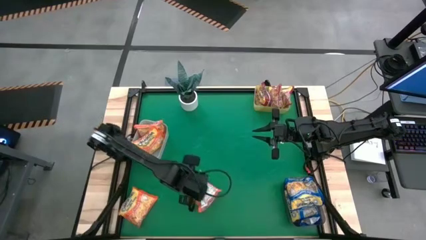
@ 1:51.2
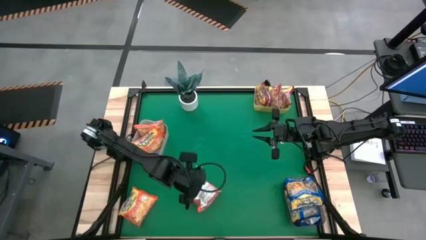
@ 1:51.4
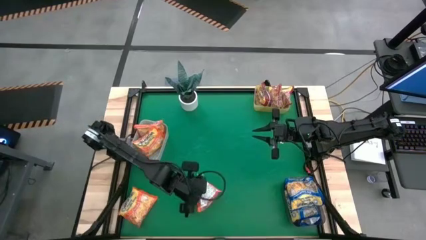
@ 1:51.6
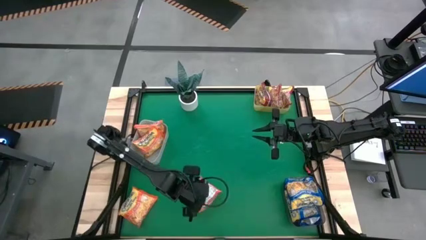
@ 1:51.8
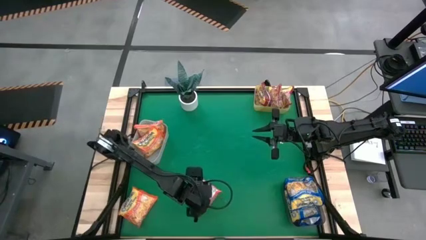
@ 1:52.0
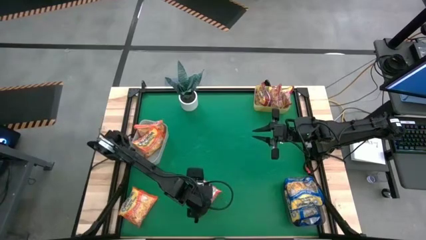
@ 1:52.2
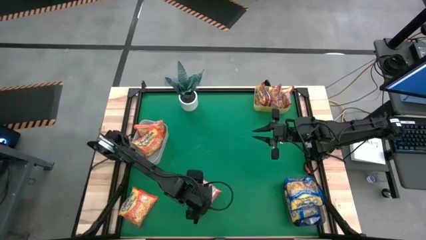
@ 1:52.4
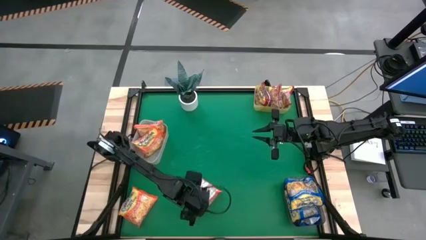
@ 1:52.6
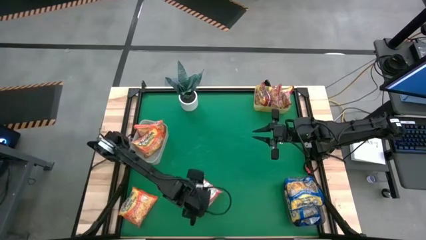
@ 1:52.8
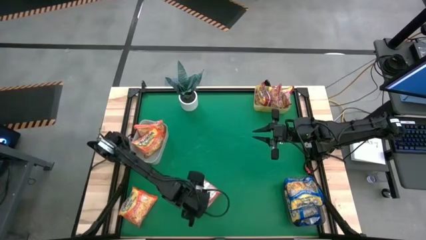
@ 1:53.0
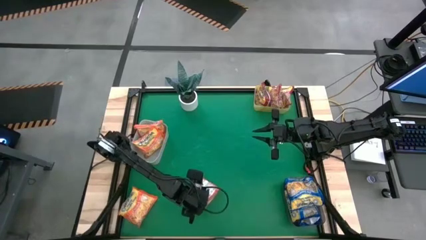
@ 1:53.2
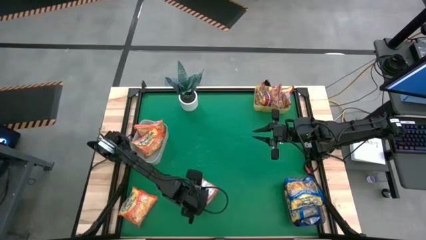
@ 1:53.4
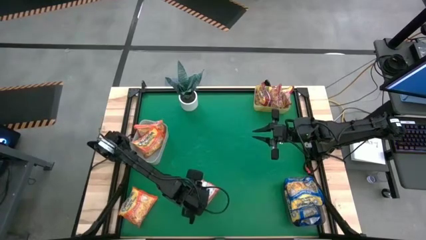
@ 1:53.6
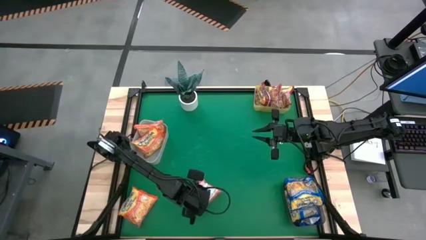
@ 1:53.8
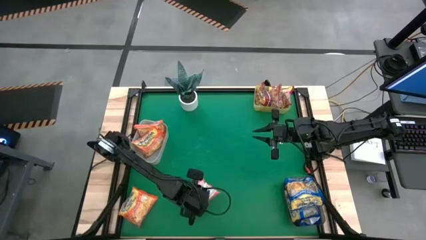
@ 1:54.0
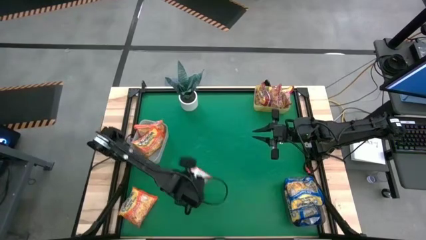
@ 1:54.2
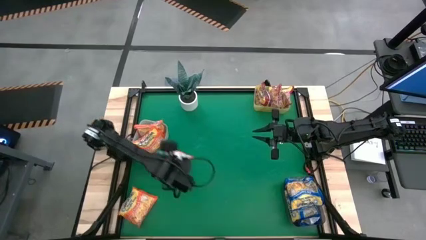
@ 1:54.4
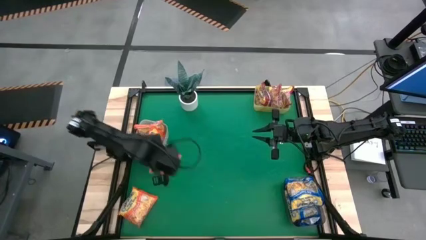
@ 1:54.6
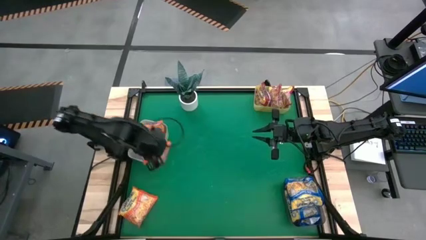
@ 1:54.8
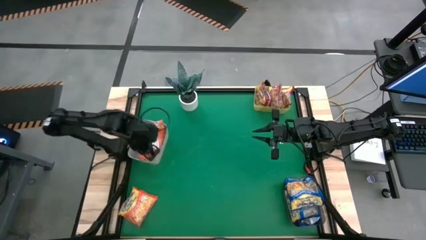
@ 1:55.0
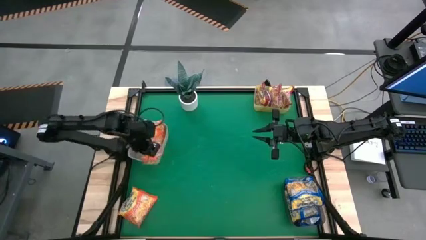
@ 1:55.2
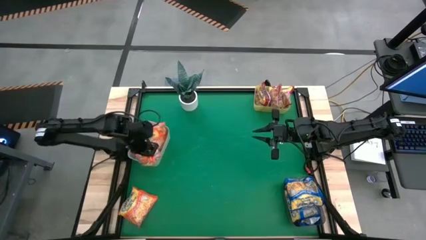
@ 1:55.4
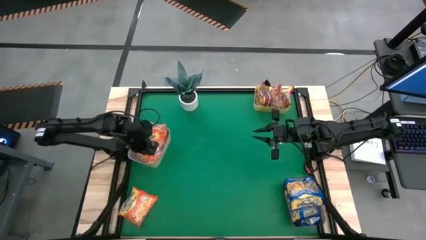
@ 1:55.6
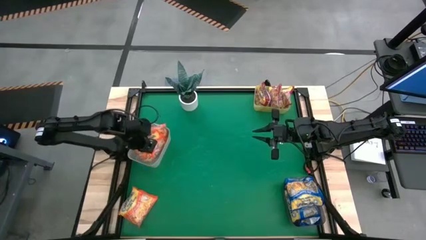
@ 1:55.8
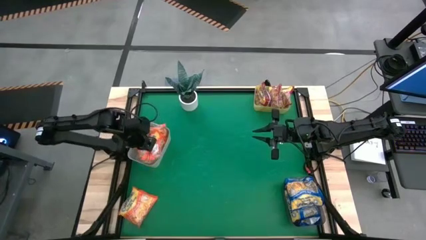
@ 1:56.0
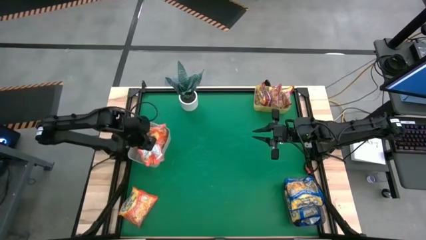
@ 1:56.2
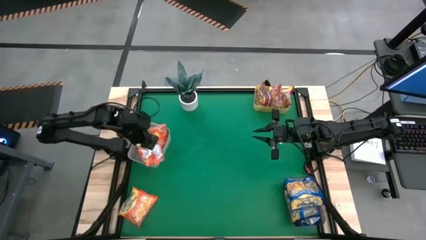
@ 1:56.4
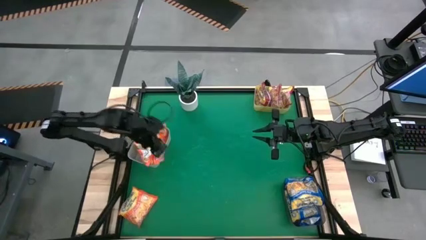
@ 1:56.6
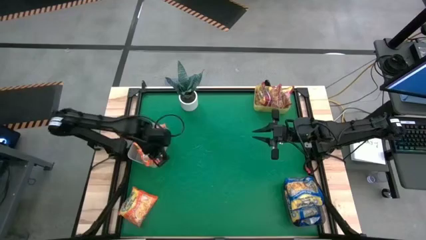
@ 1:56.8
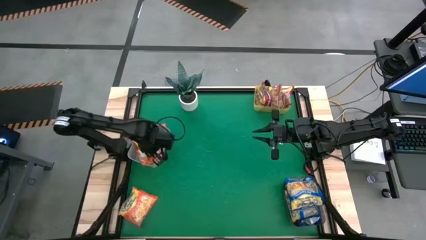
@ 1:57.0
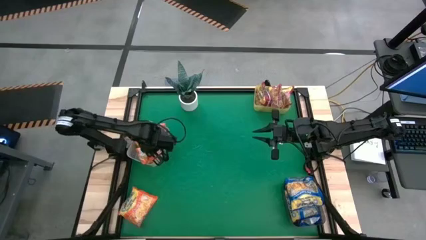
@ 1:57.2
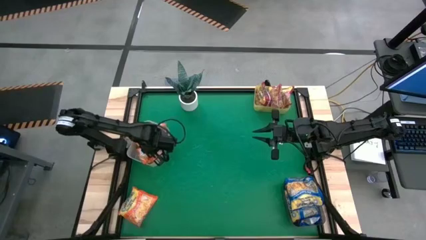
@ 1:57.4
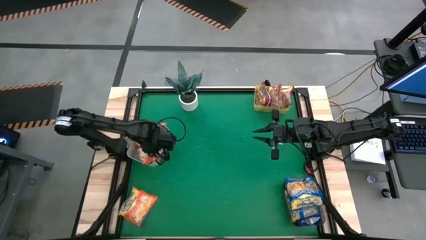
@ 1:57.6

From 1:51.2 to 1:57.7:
Task: Sort Maruchan noodles
Put the orange noodle pack into the white bin

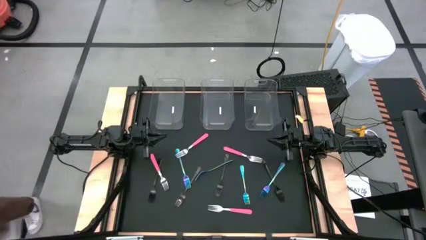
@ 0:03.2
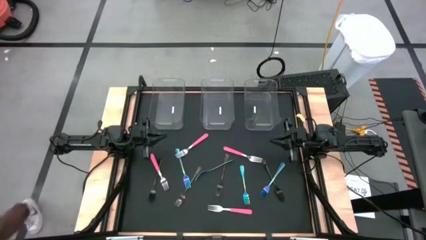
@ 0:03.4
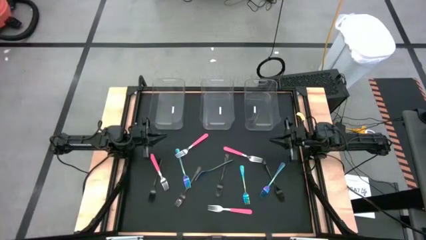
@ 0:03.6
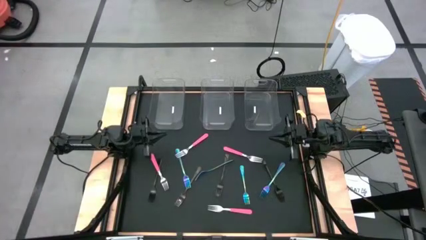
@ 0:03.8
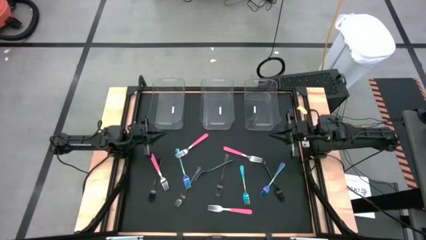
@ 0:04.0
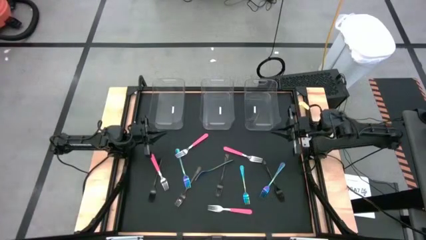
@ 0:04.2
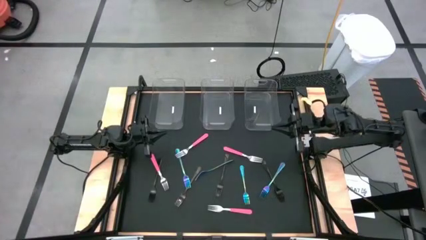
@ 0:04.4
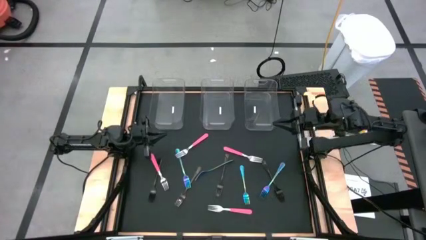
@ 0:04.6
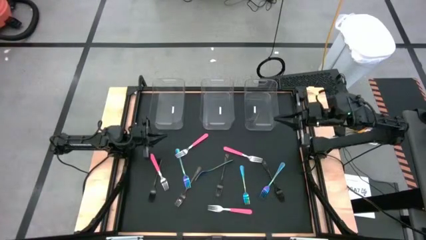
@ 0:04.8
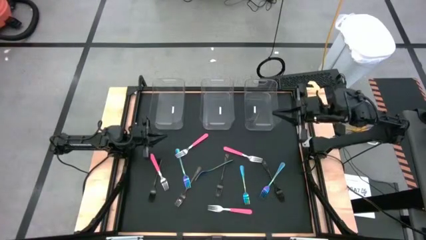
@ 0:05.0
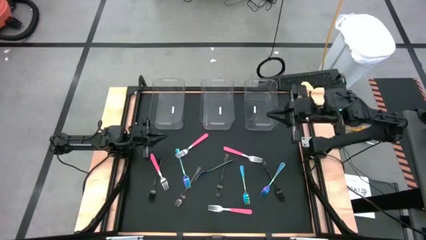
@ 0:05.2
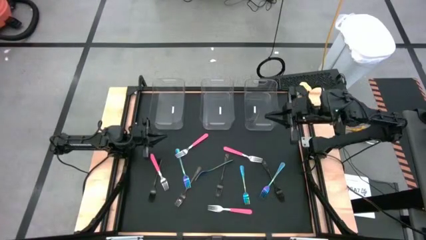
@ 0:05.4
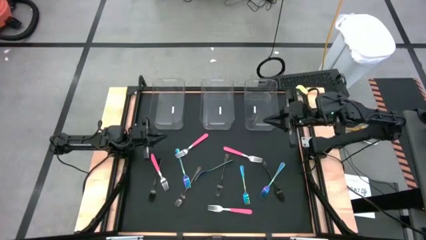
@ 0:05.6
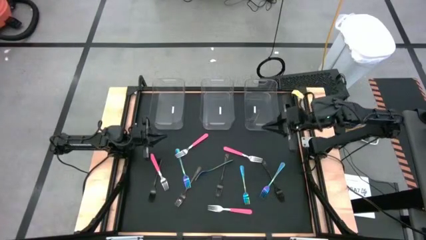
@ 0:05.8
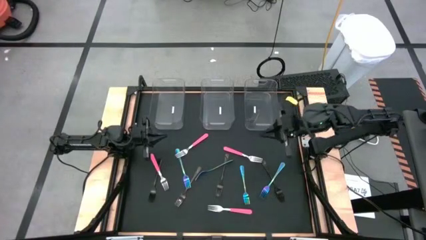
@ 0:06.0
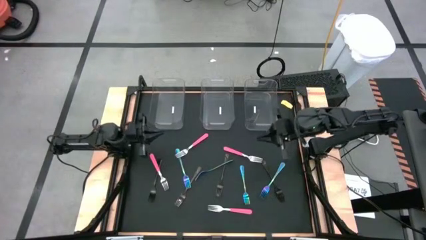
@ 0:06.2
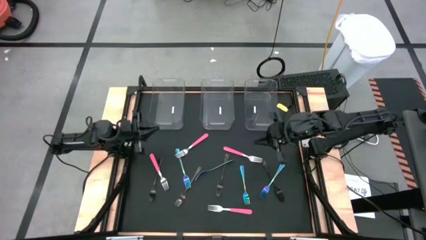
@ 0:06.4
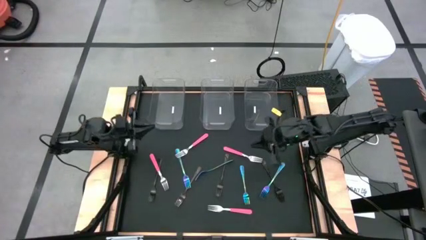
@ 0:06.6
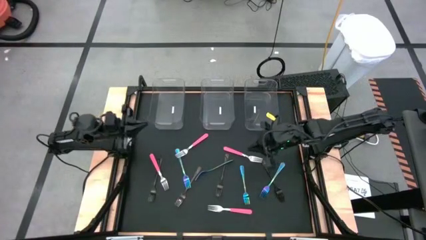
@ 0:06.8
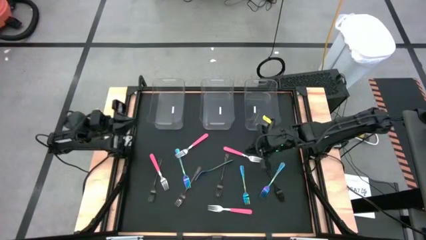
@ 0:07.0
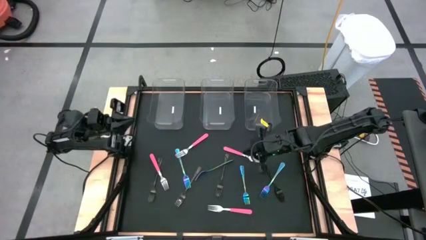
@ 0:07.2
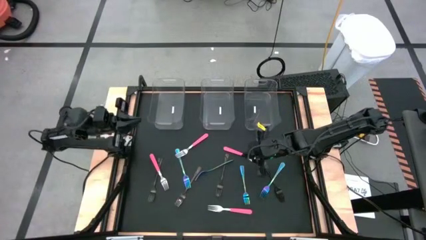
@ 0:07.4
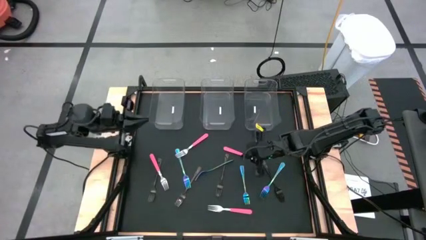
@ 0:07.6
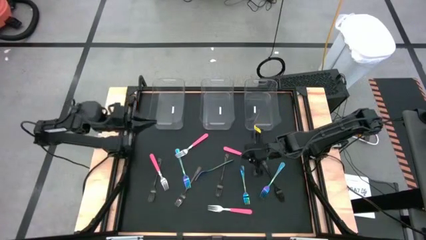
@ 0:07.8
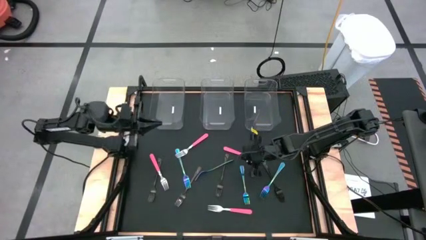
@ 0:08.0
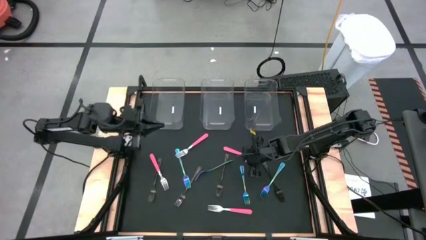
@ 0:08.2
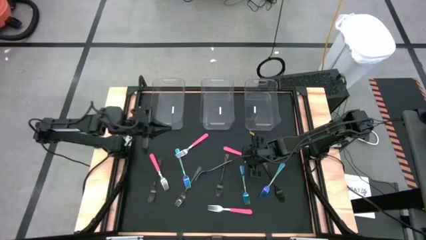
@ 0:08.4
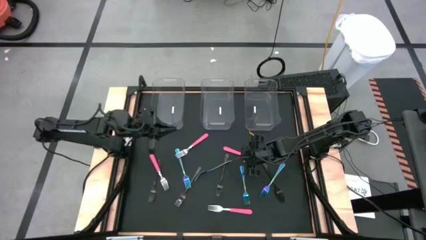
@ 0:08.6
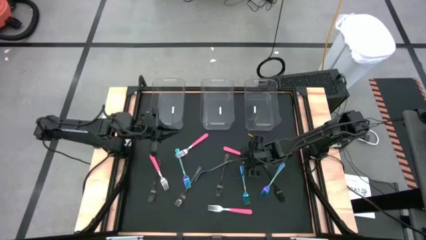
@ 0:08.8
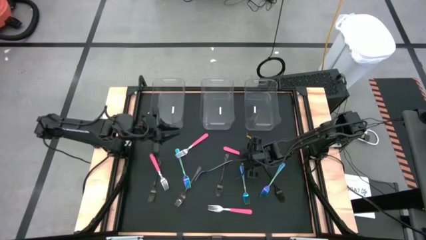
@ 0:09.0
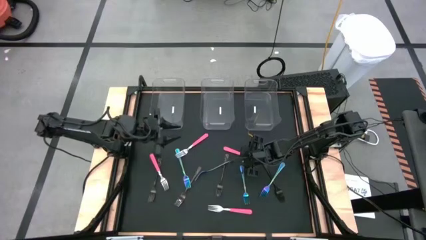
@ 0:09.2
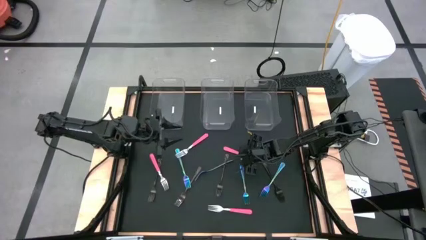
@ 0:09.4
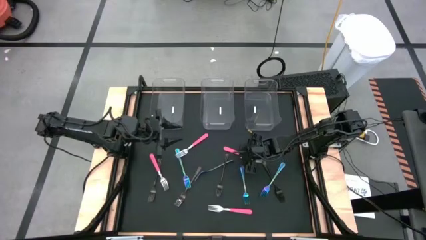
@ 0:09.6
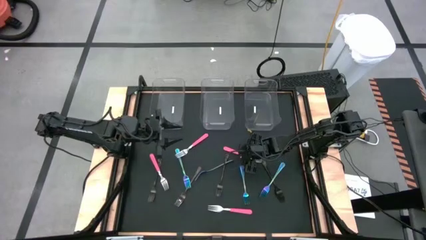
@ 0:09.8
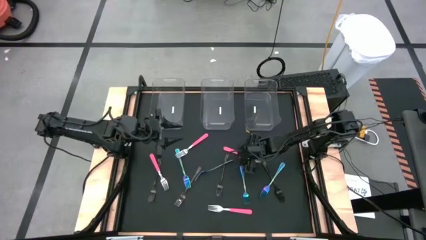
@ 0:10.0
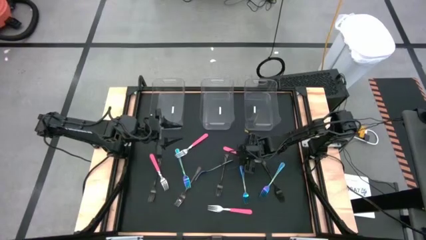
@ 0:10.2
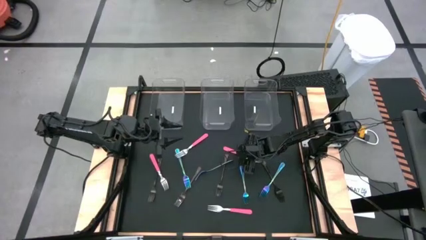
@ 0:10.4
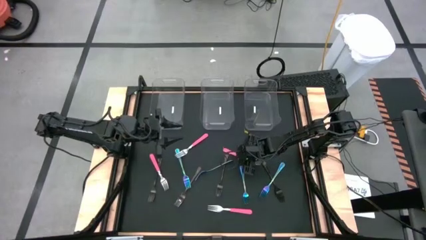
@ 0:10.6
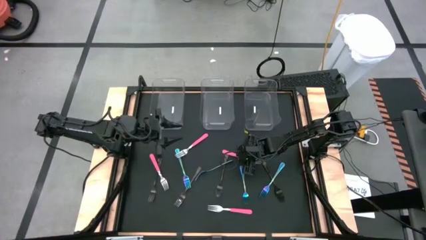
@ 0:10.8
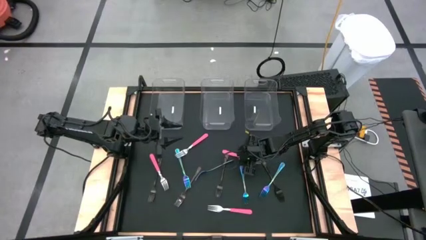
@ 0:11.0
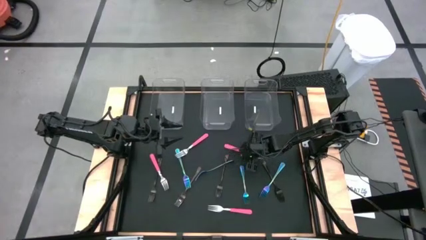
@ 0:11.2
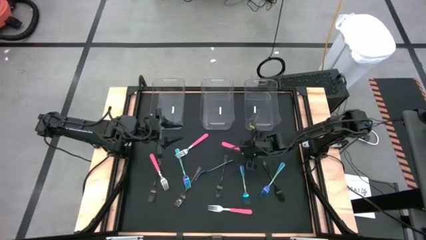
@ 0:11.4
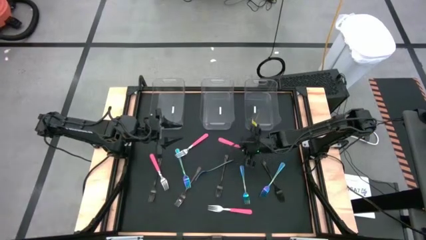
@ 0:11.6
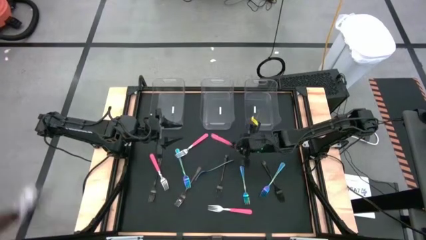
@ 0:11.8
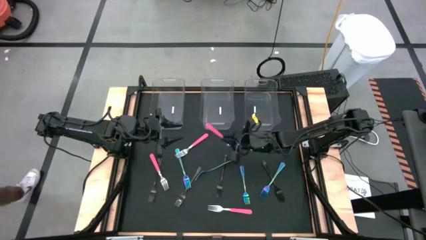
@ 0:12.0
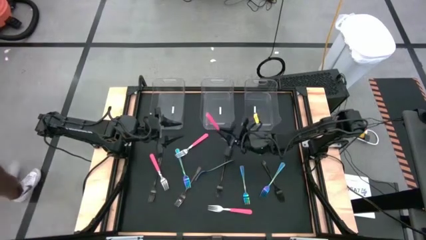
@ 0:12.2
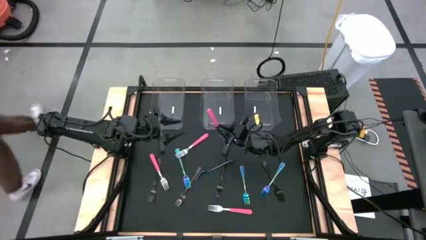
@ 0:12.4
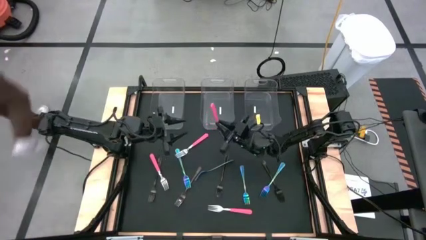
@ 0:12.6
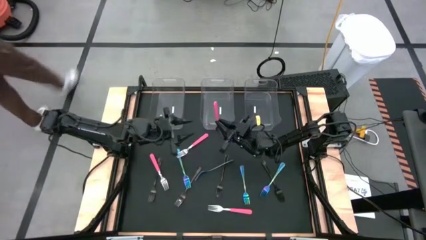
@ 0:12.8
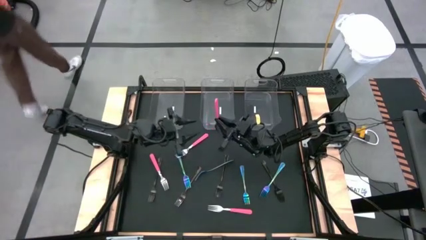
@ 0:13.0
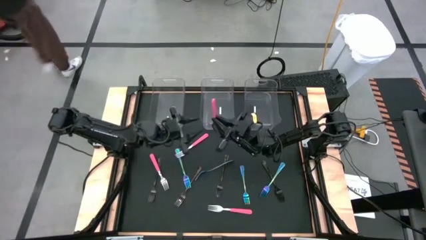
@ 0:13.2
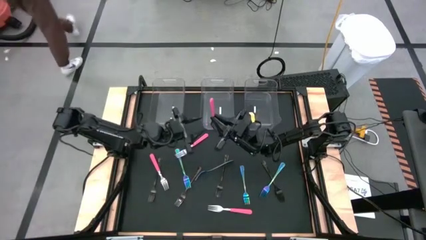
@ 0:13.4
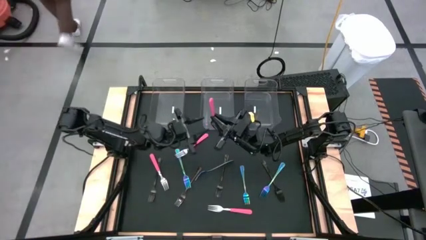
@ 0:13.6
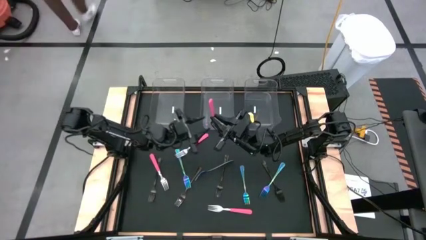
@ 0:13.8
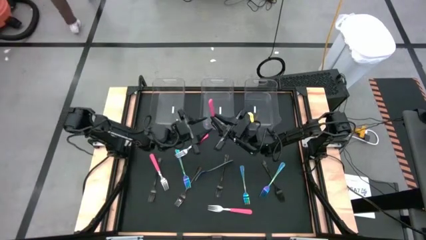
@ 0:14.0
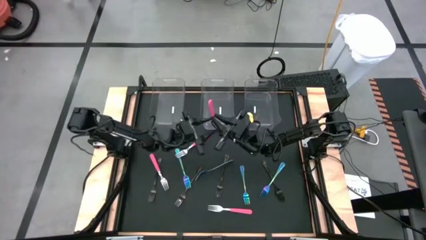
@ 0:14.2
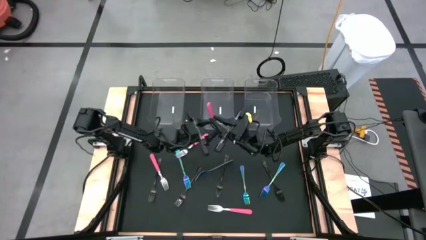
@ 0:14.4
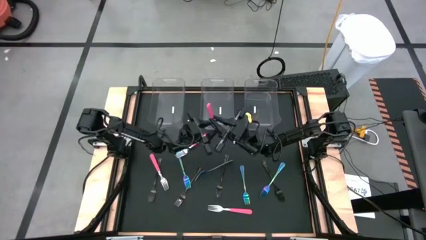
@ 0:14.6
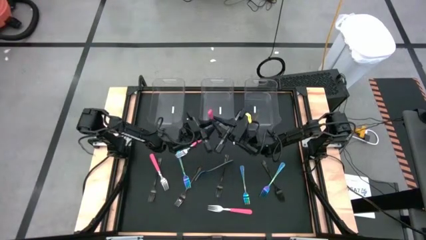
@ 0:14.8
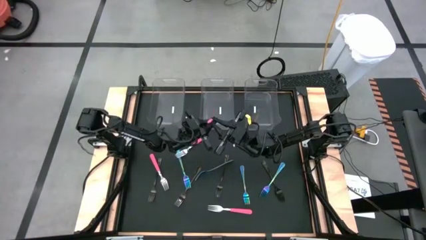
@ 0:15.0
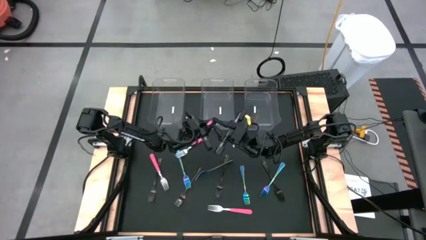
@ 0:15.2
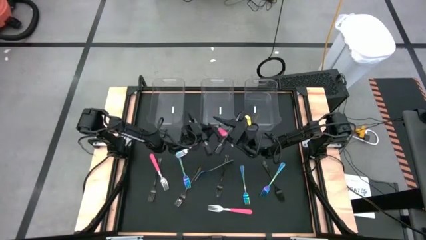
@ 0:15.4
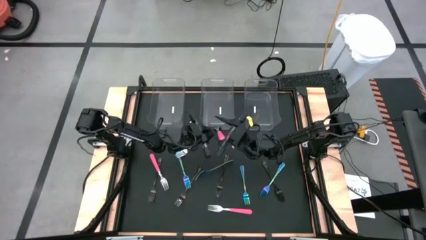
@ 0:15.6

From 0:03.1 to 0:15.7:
Task: Sort silverware by color (type)
Put the pink fork into the right transparent bin
